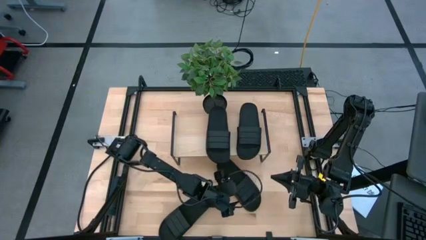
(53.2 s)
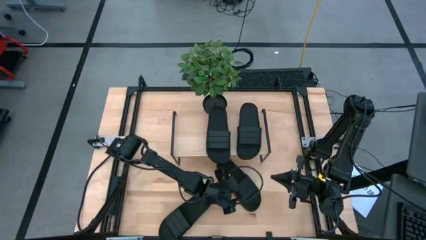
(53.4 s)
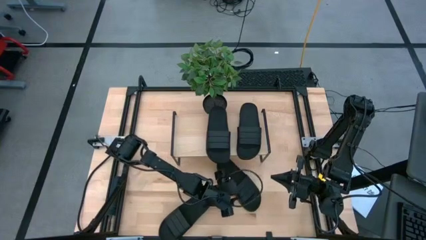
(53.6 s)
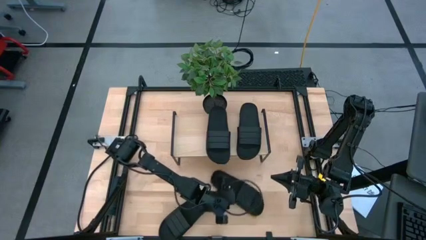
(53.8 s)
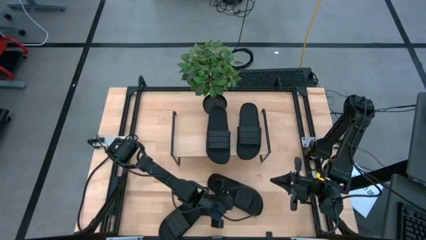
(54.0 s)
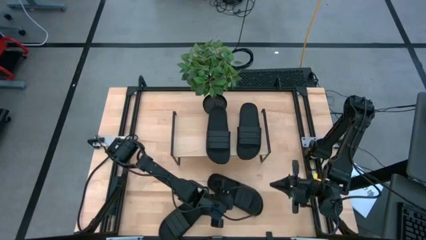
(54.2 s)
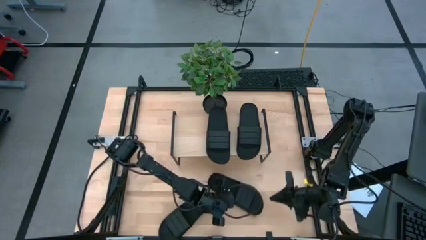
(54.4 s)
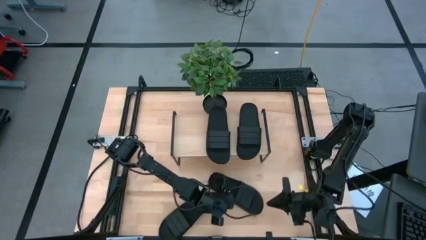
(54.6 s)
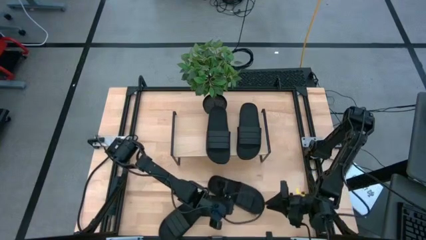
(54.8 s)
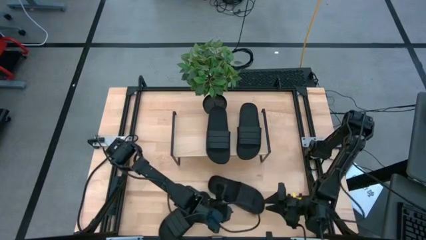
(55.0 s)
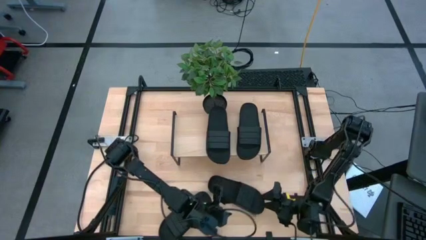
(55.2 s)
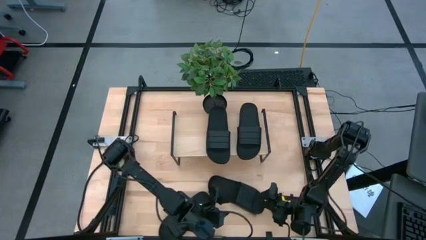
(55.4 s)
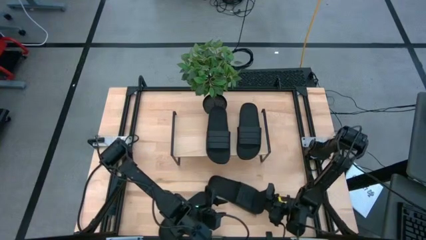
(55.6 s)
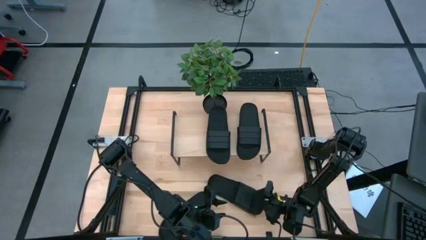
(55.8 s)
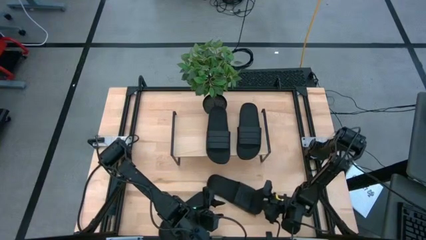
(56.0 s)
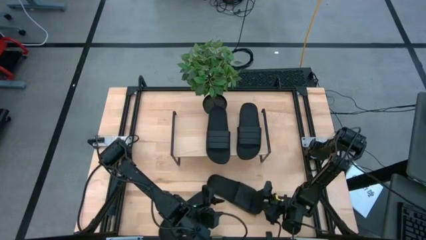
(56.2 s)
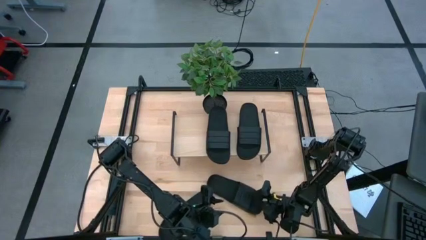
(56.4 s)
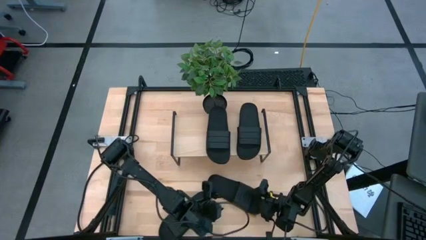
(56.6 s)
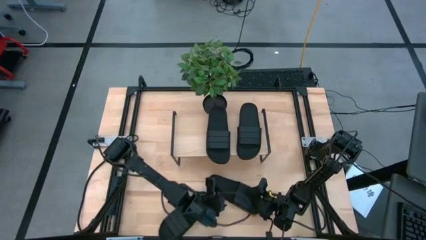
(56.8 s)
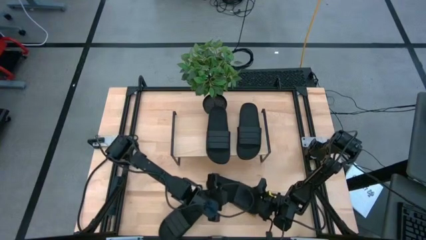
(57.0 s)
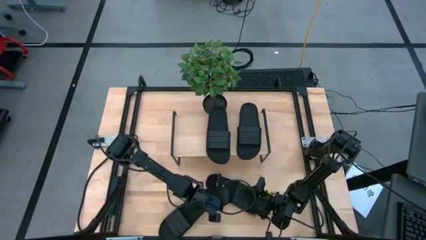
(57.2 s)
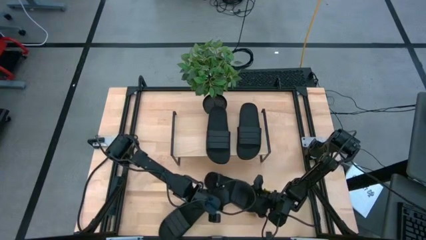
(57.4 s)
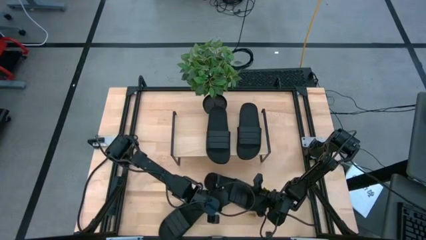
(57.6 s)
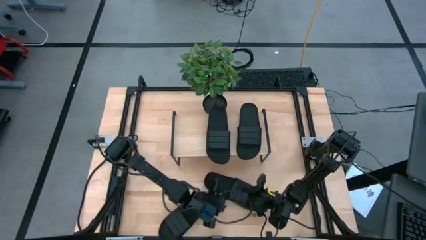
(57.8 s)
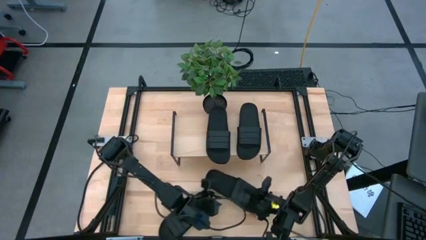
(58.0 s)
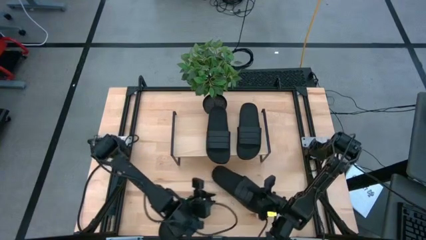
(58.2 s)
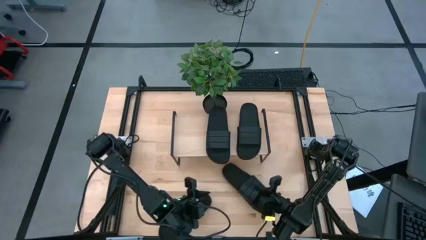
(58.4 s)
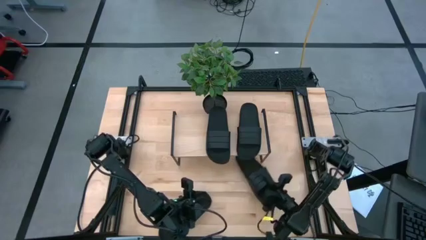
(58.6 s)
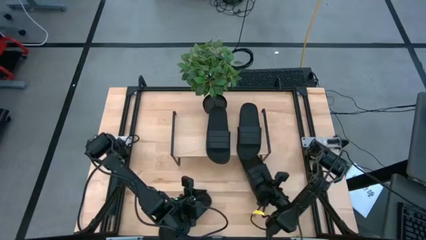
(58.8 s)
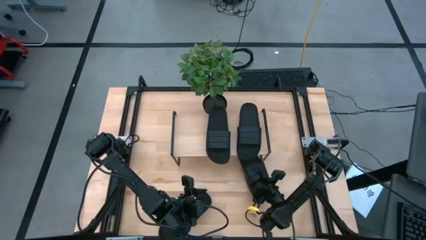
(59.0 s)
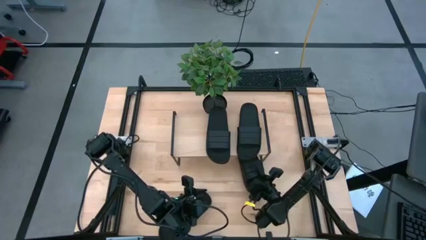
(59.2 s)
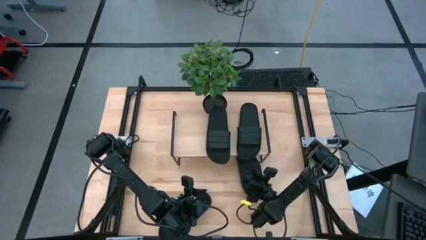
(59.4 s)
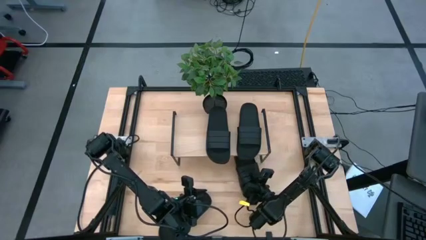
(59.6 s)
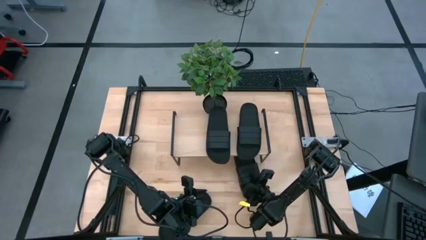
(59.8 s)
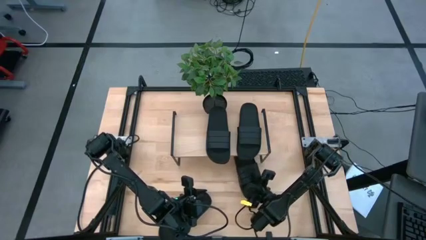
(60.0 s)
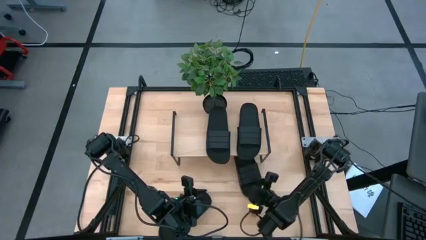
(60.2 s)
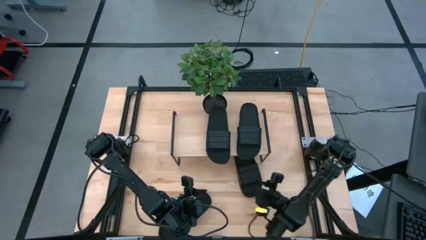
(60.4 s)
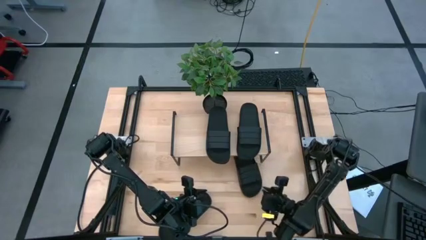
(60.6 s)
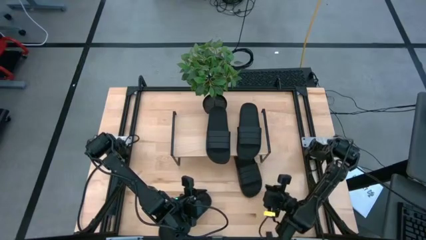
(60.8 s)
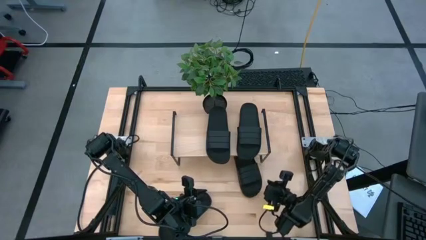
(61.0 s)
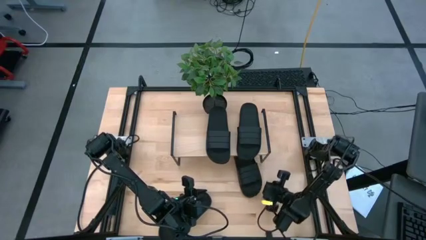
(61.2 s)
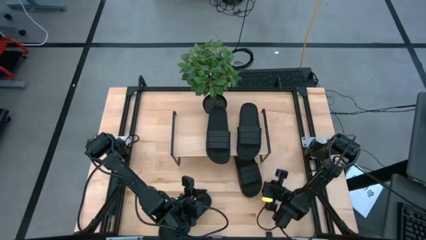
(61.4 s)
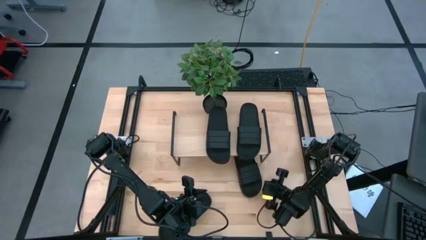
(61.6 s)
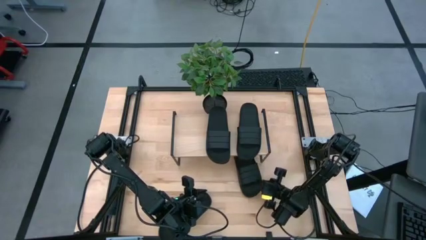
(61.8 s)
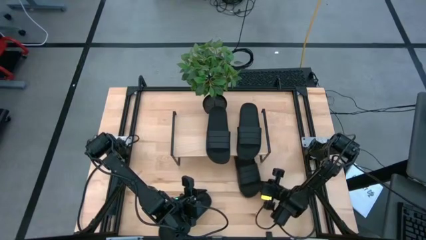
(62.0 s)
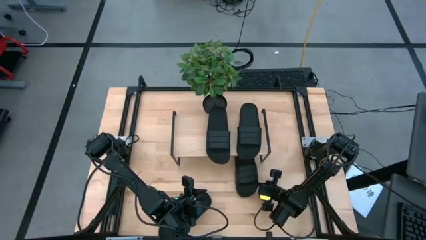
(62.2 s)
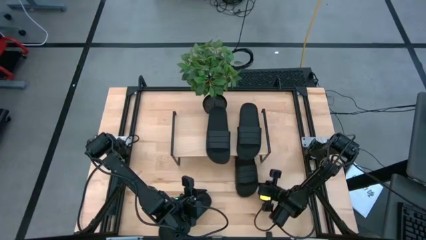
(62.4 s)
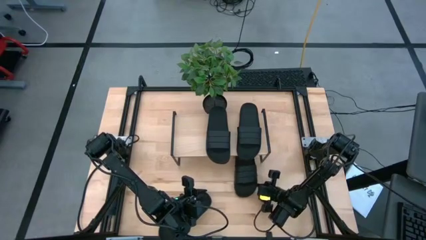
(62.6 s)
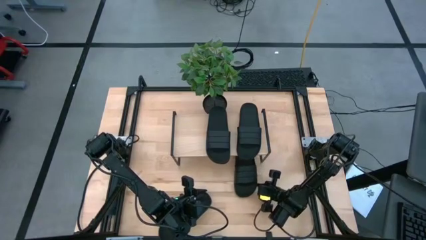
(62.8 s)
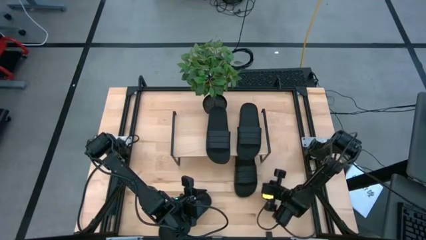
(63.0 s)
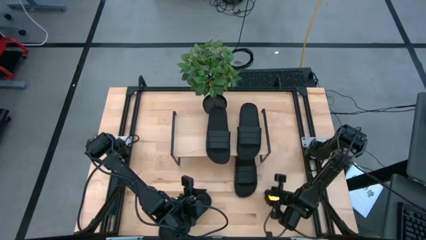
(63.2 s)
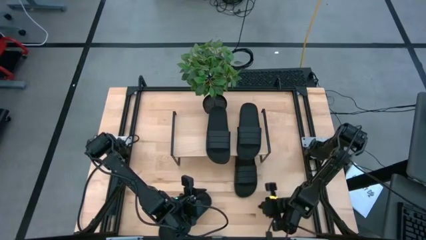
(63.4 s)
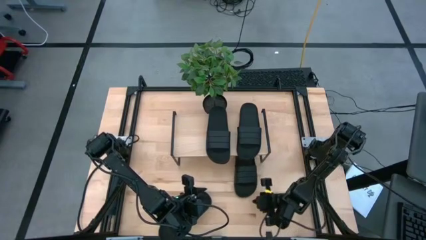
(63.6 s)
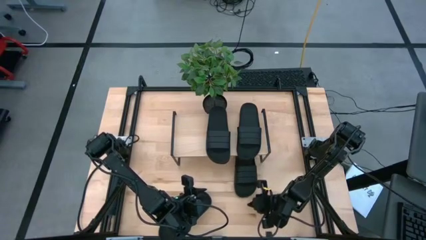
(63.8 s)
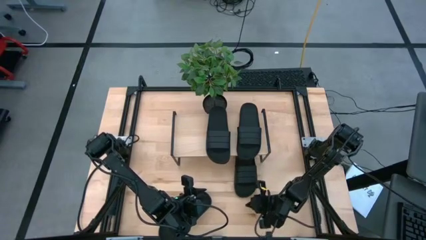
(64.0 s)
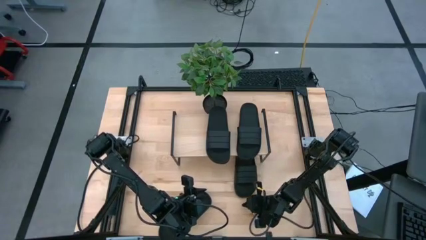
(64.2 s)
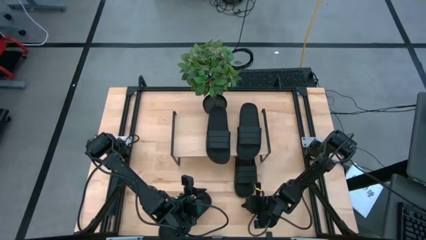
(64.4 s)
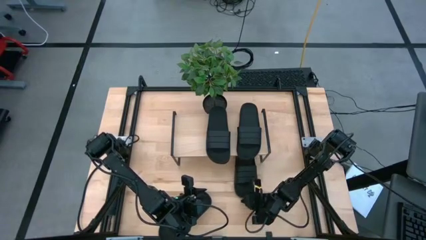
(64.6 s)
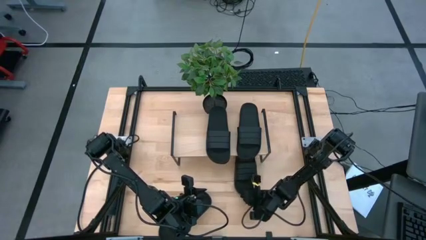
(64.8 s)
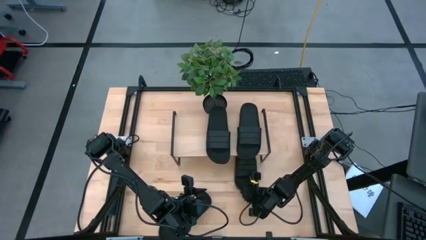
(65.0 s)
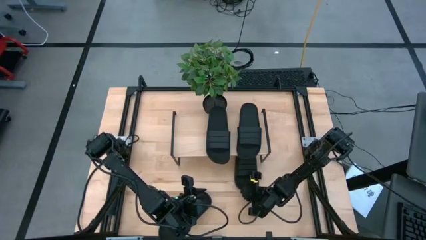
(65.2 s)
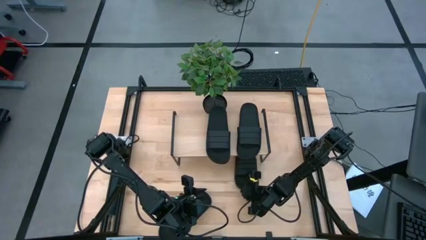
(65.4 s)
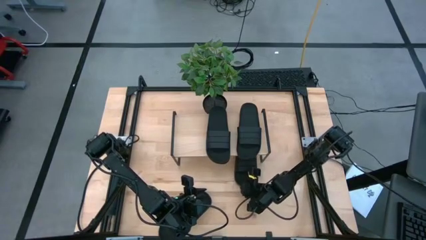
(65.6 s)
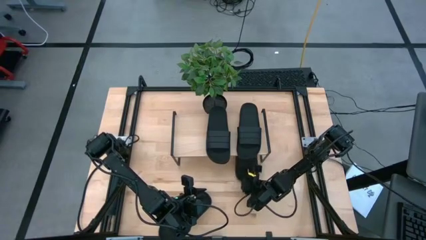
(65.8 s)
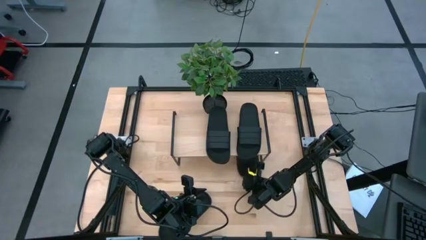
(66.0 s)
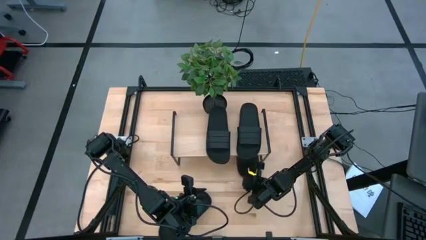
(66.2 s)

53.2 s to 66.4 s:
Task: Pick and place slides into the shelf
Put the black slide under the shelf
